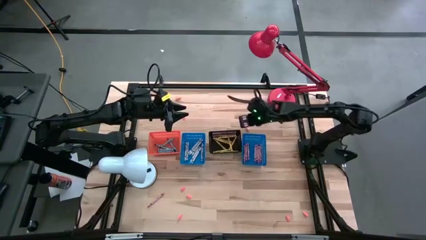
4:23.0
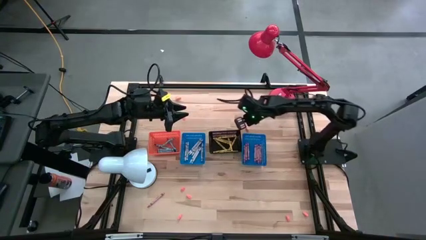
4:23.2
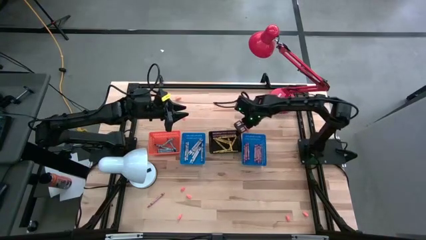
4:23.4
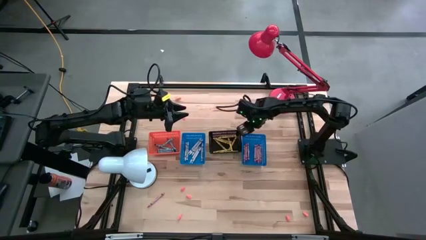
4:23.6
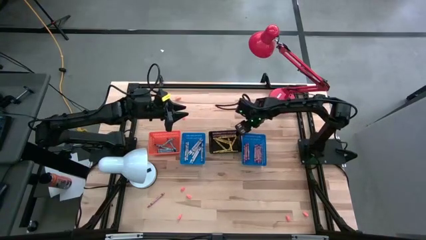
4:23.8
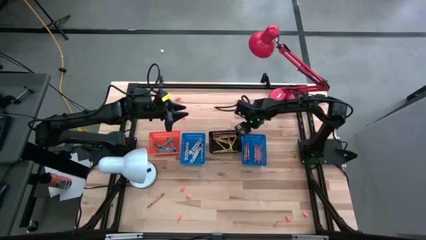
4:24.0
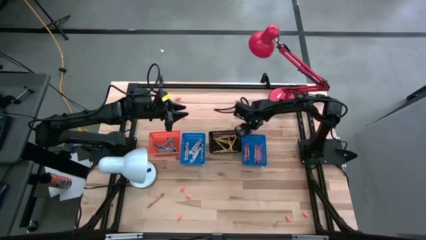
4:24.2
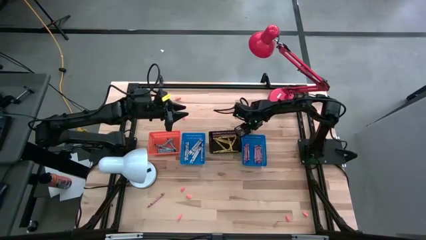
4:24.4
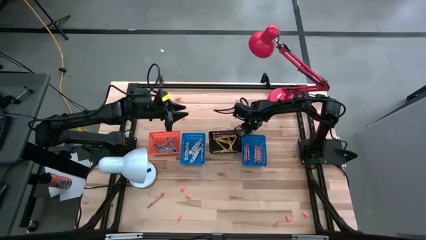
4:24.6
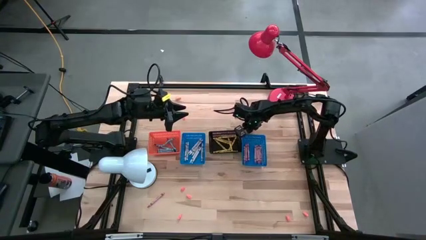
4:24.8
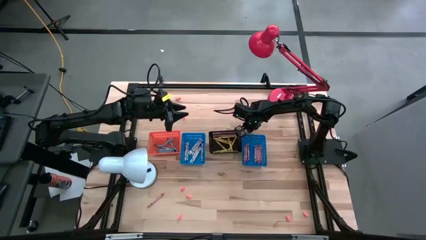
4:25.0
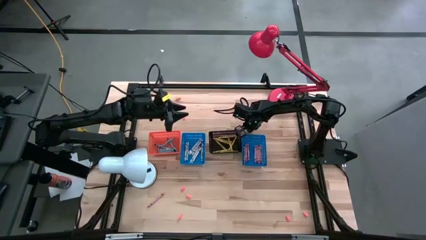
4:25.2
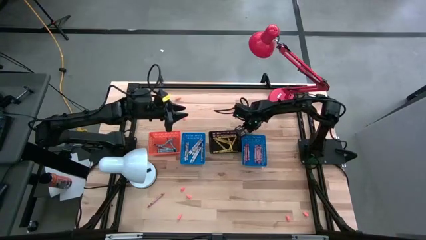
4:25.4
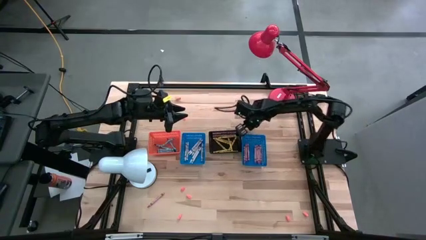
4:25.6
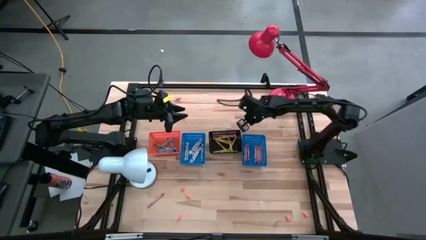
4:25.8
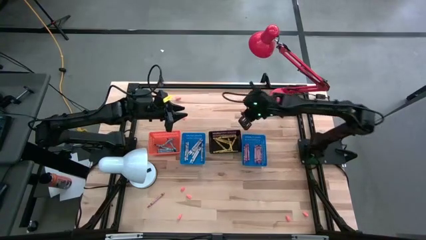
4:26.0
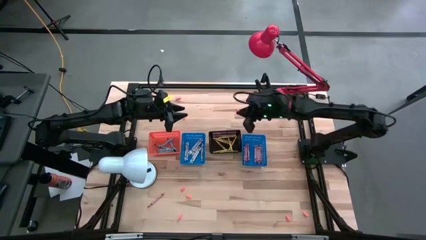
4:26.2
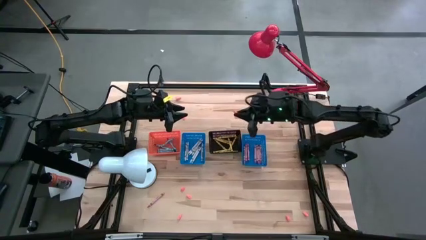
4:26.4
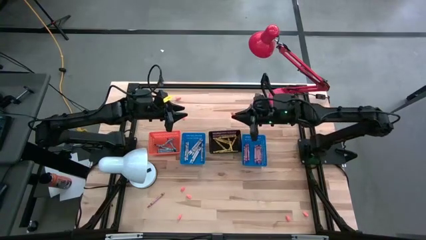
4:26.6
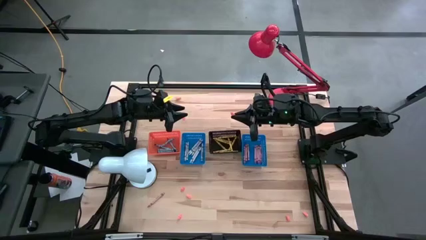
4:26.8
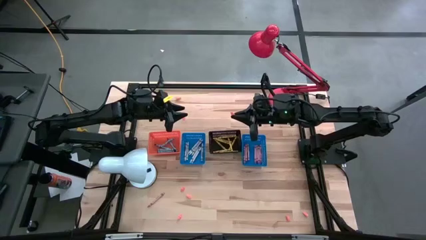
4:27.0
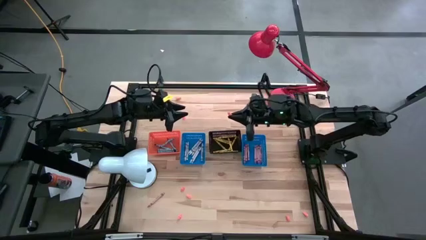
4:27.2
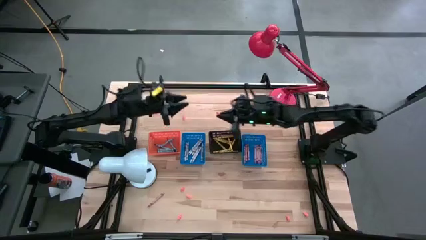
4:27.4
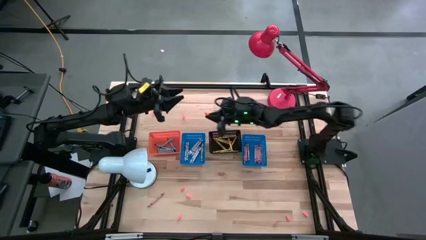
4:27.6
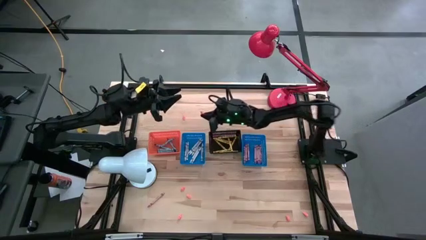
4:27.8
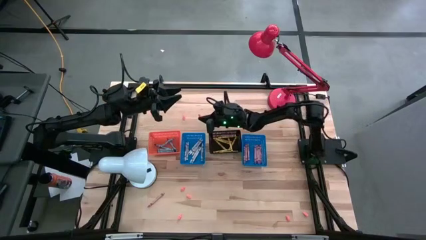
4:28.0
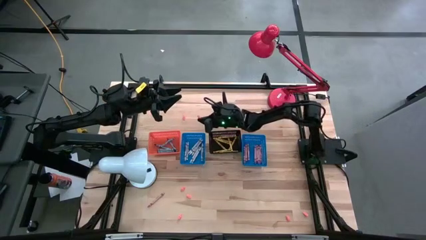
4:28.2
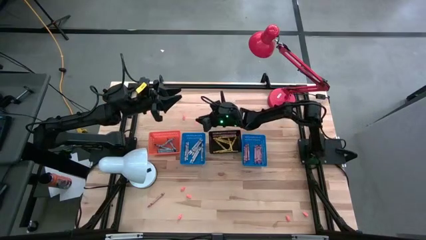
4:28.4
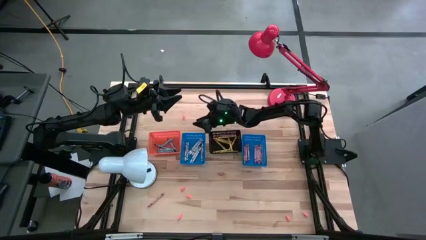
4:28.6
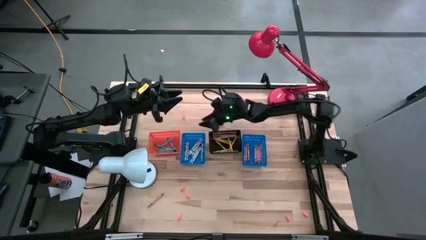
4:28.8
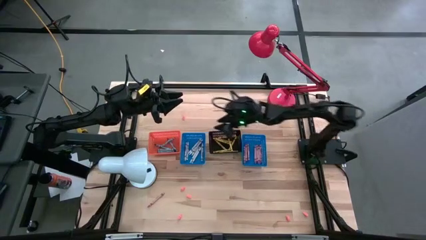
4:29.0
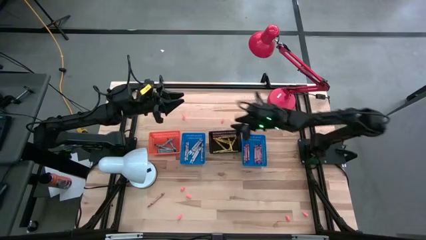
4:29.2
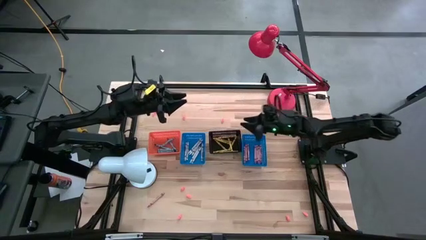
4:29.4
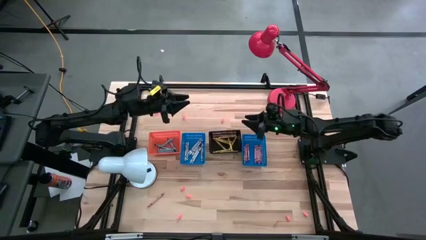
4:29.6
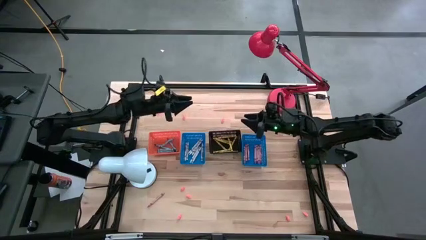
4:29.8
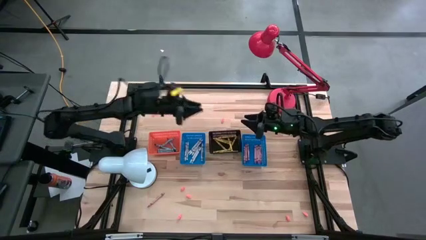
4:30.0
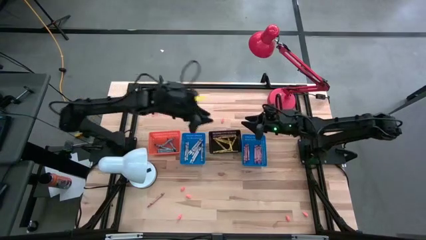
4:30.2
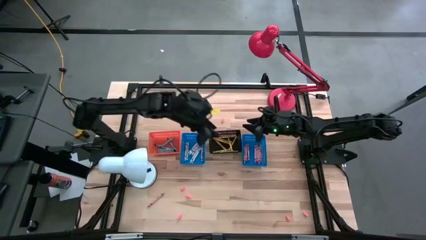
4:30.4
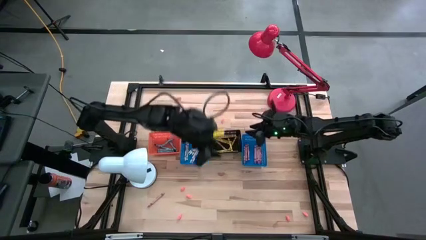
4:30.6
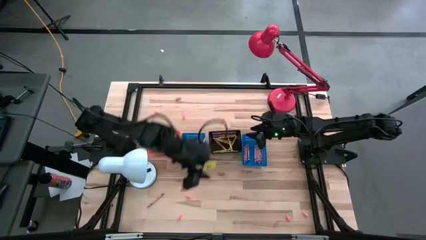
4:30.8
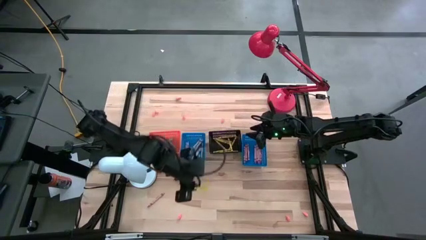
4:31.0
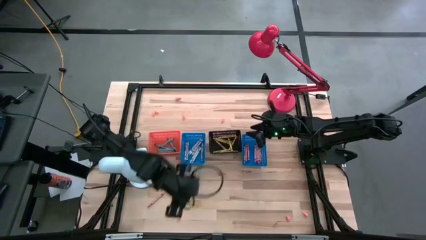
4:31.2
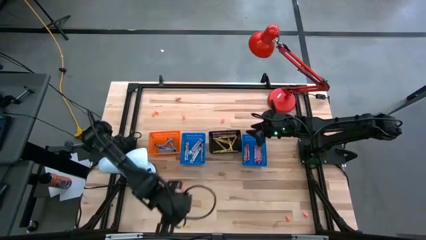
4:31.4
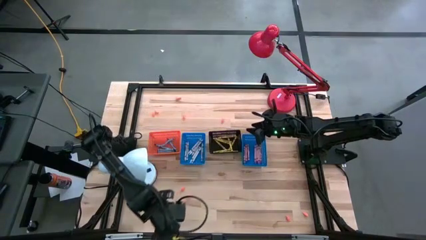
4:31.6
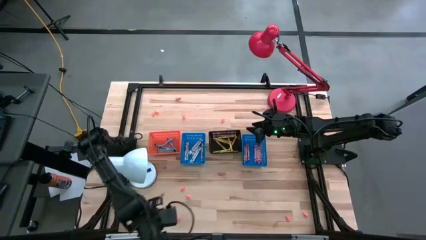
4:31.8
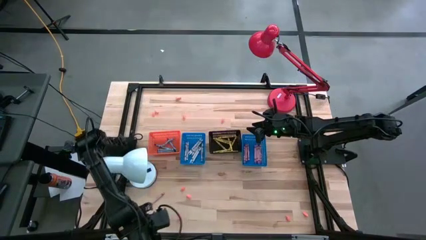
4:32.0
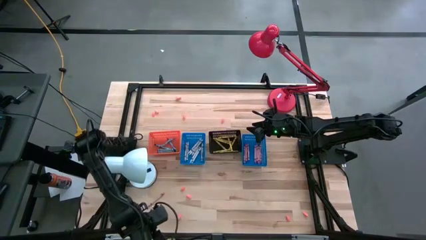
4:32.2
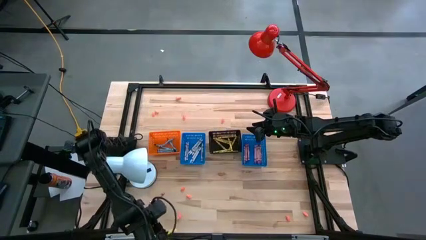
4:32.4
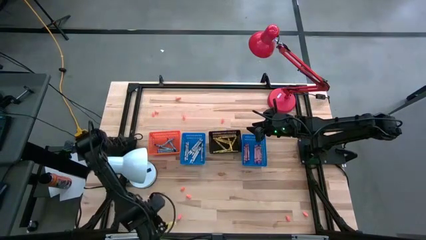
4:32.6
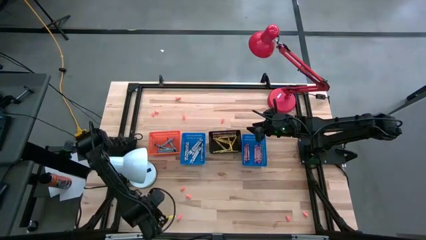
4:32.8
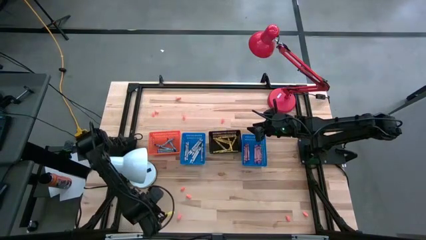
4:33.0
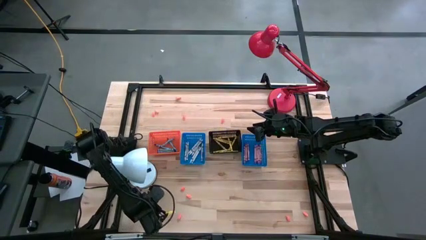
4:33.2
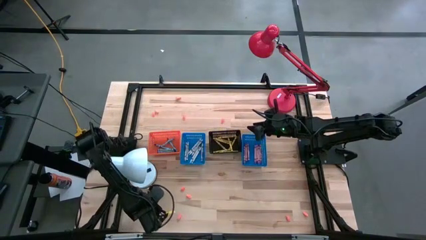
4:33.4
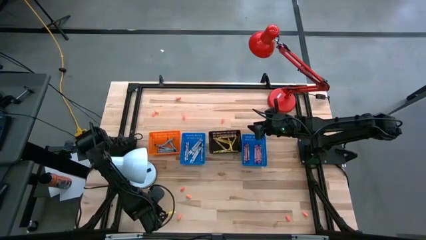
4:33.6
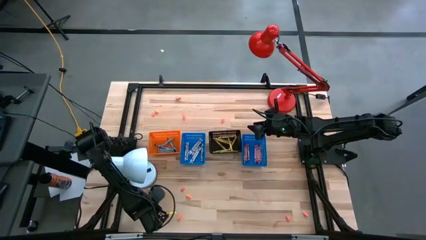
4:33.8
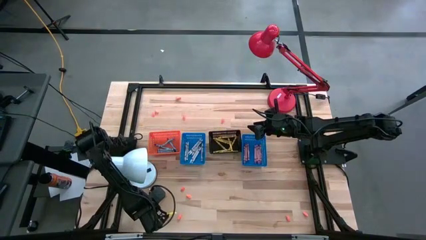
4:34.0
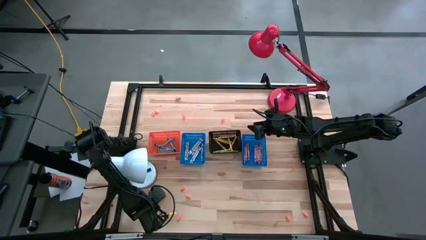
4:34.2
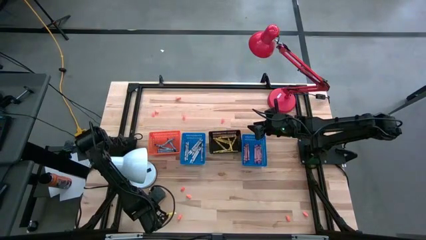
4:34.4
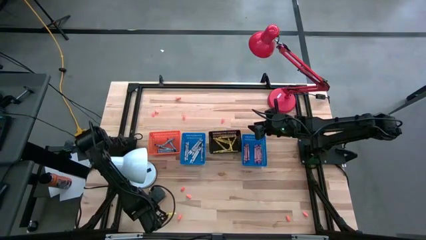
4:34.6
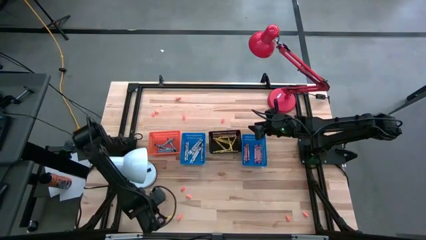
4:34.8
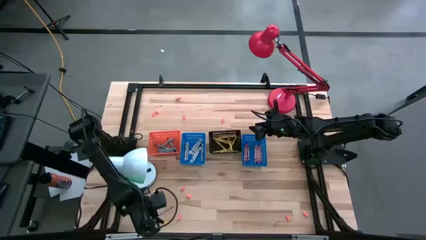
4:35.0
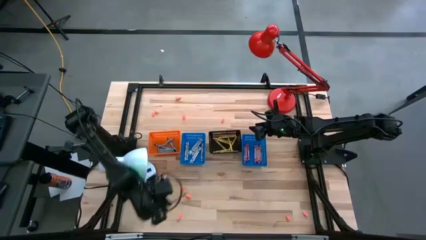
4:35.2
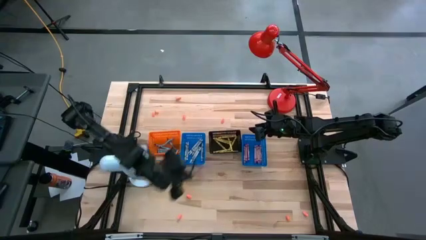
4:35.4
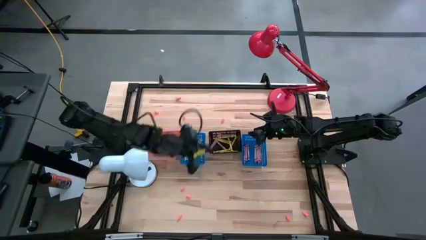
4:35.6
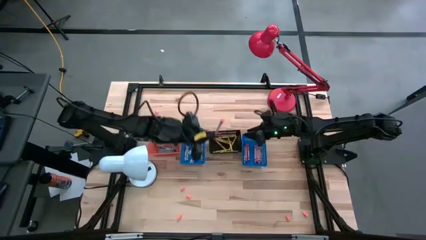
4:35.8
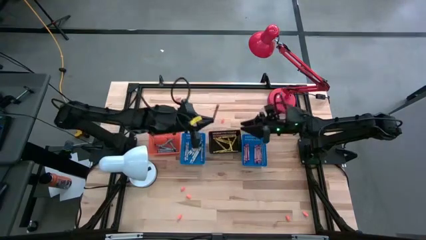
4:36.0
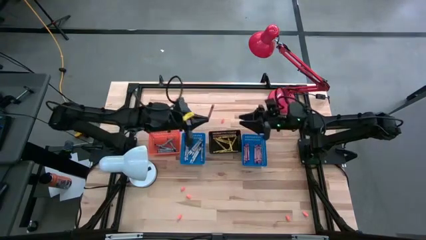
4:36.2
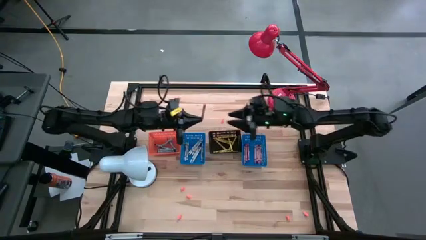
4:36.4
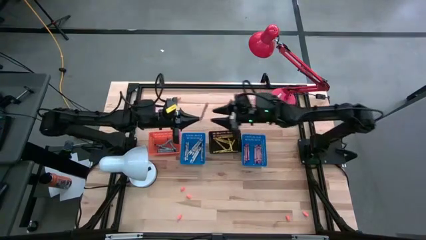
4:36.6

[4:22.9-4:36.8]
Task: Sort crayons
Put the pink crayon into the right blue bin
